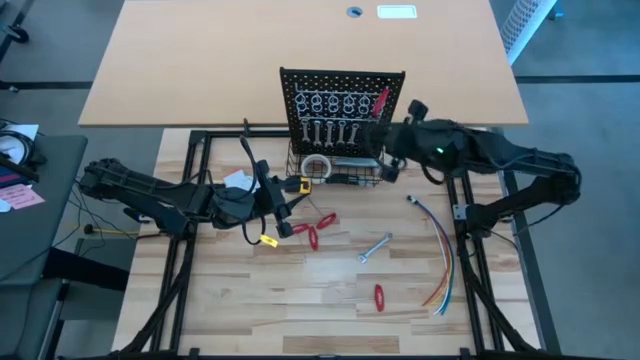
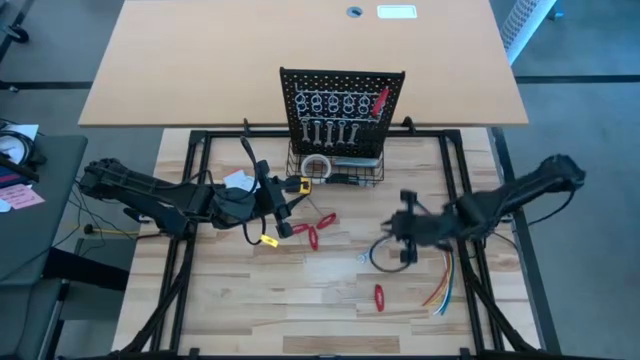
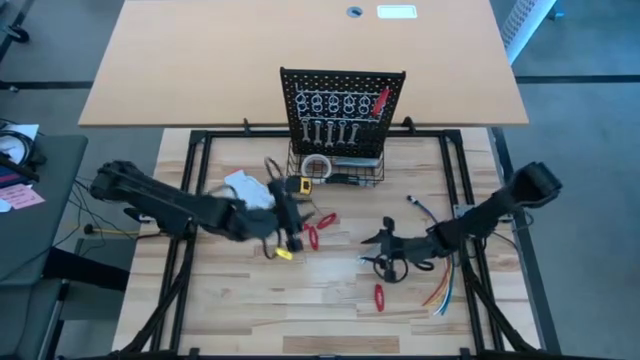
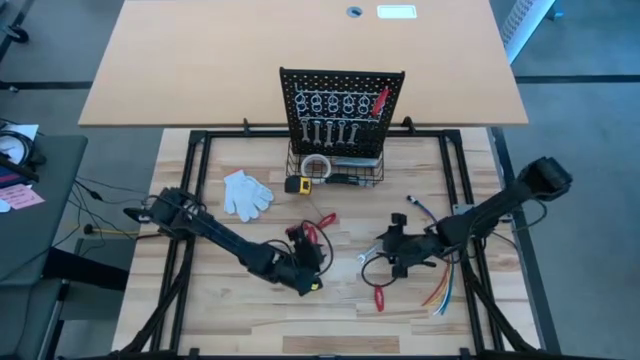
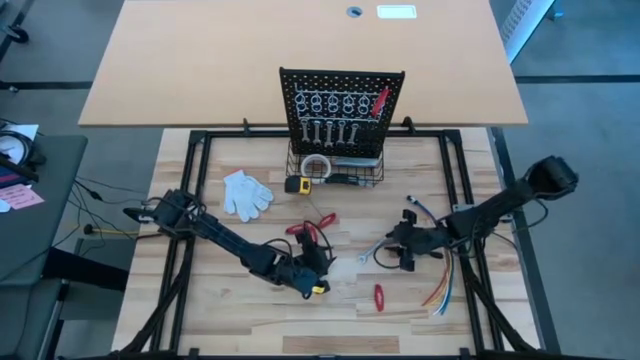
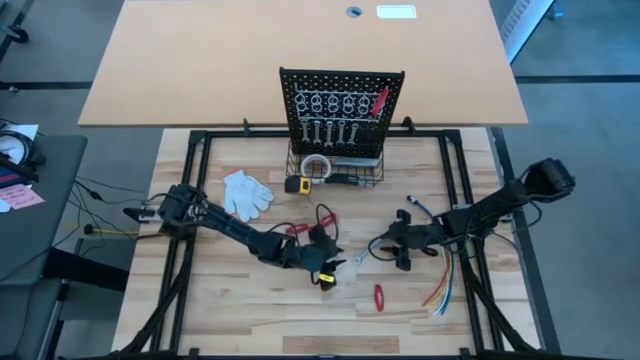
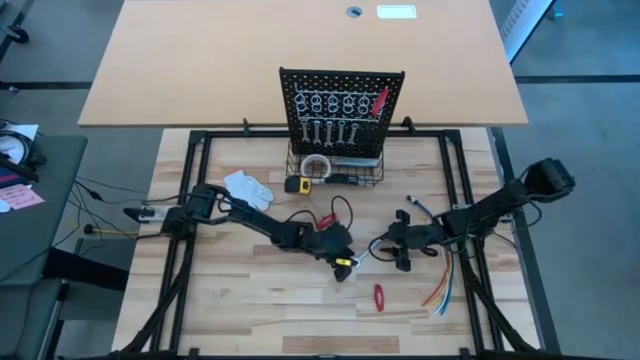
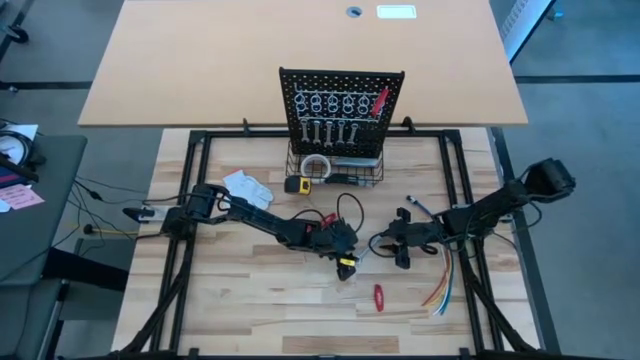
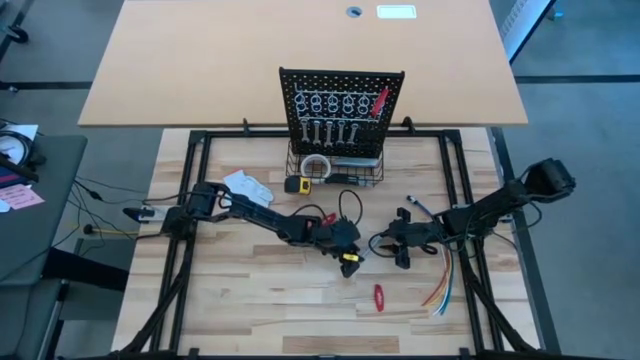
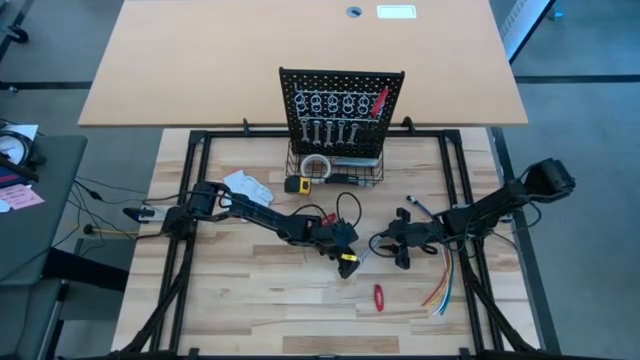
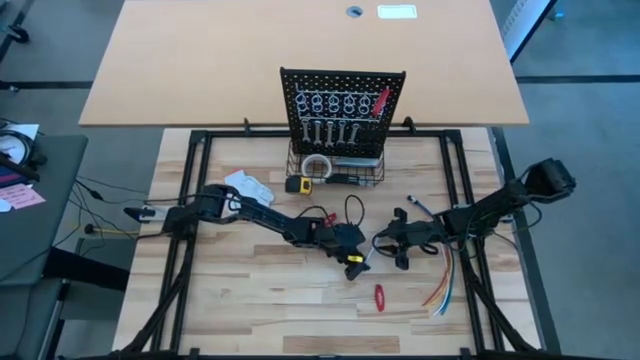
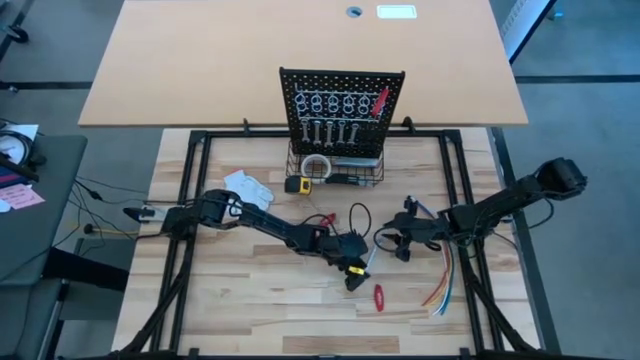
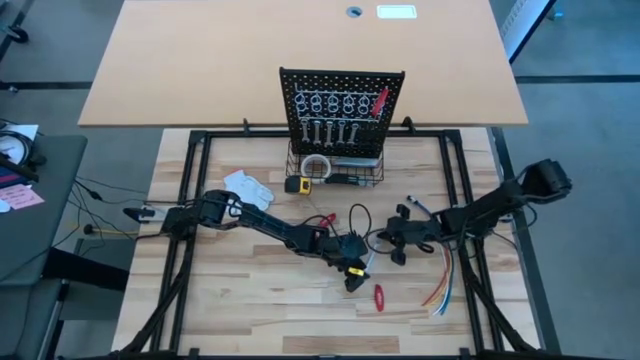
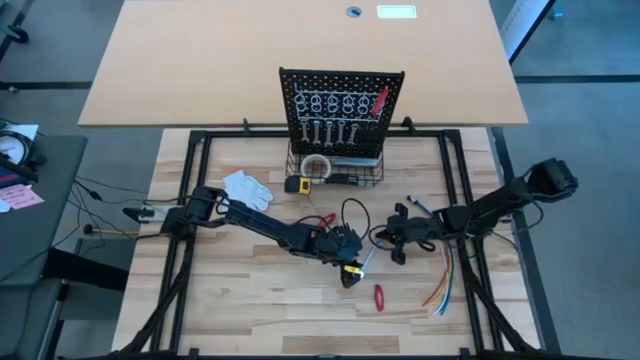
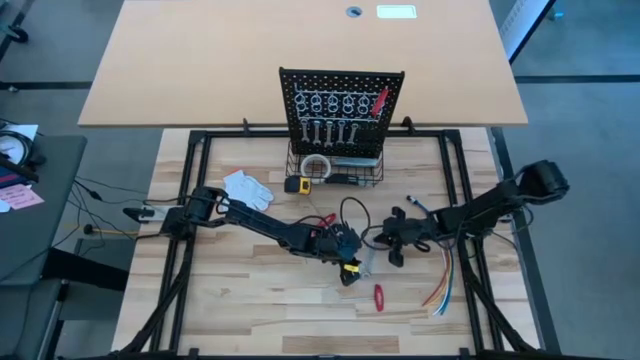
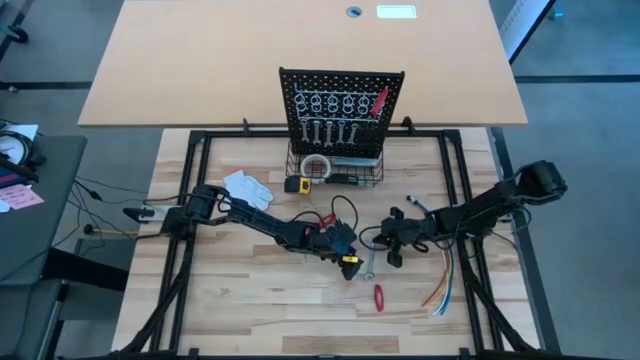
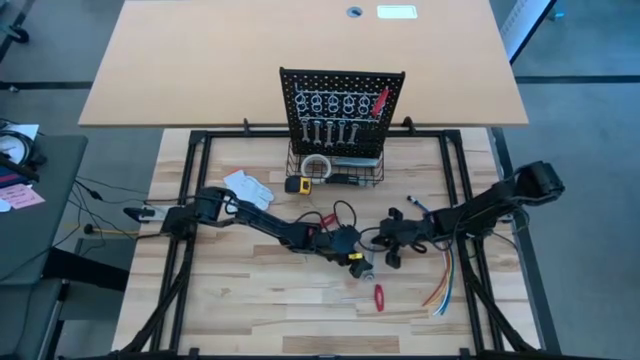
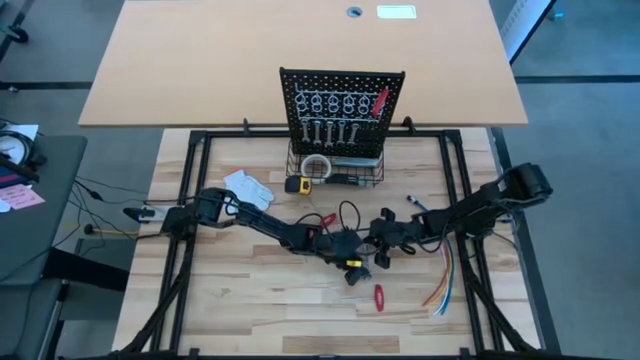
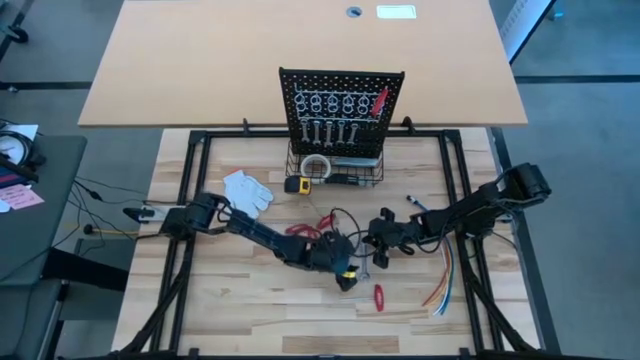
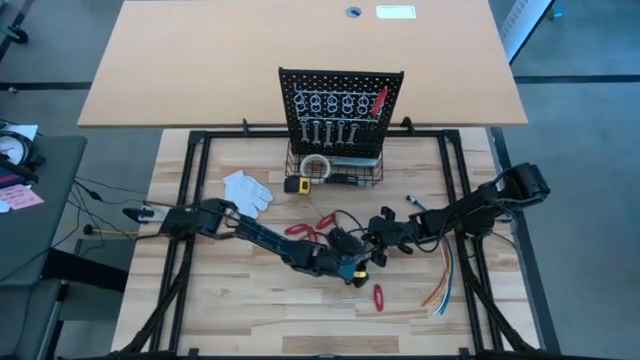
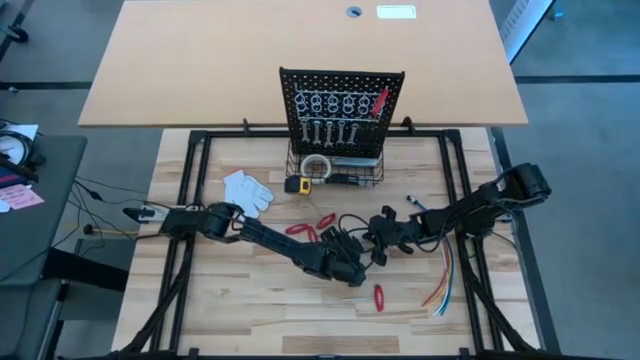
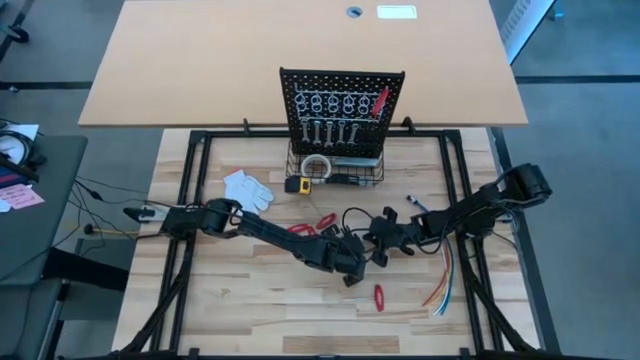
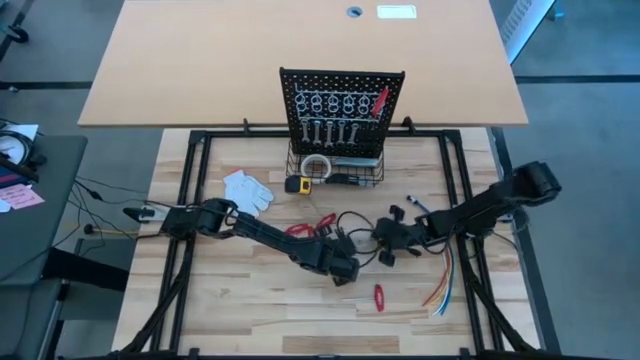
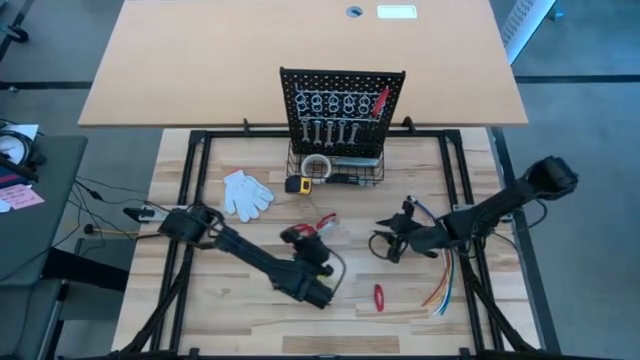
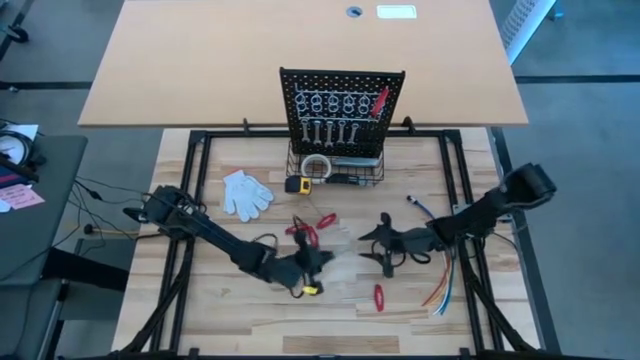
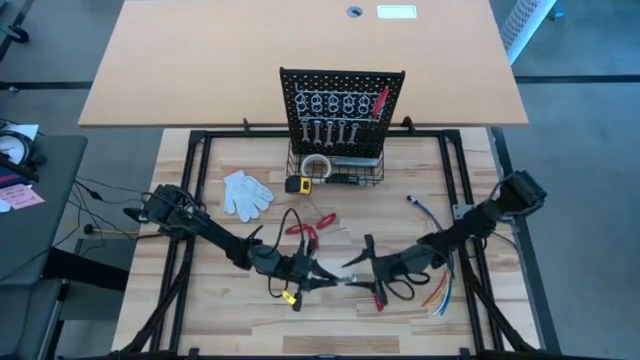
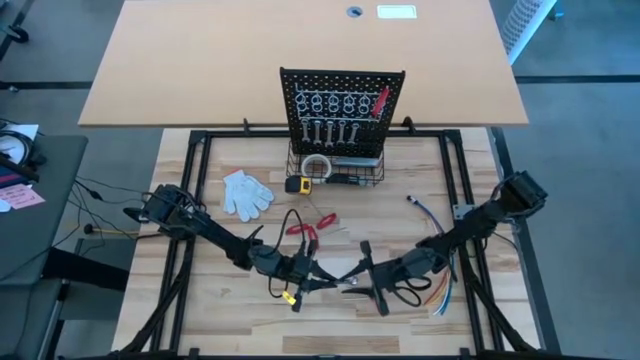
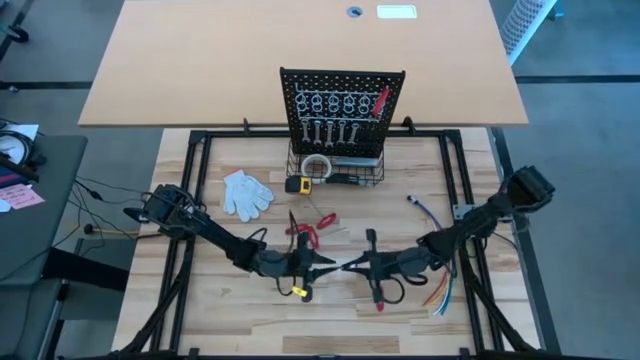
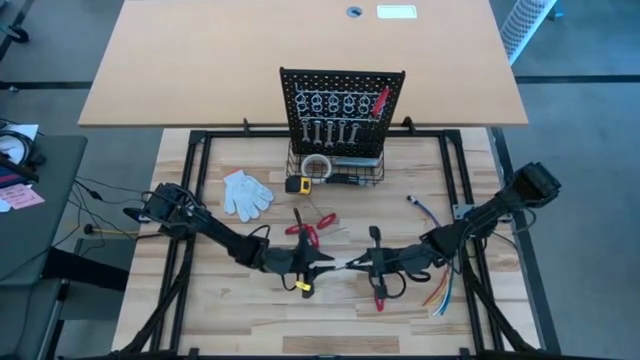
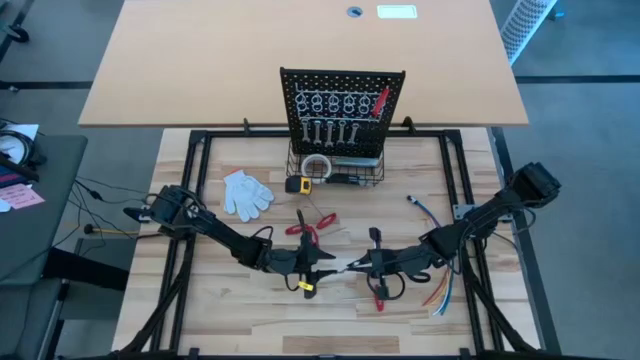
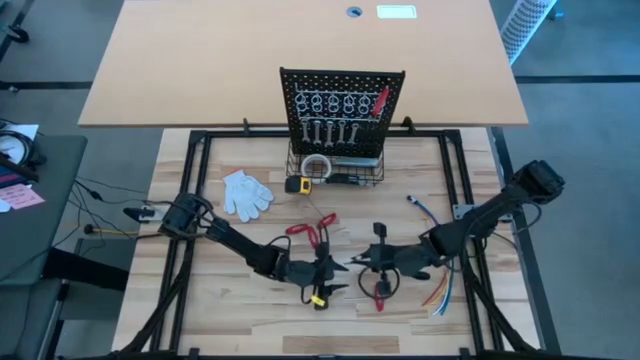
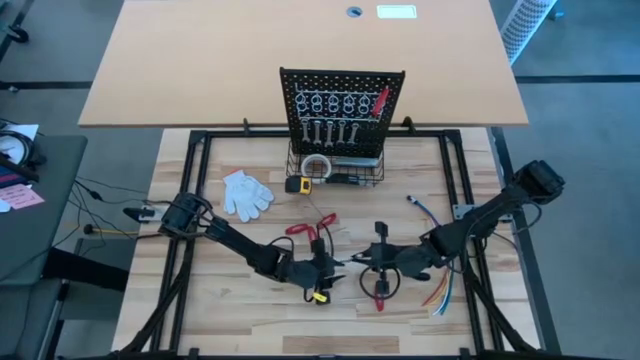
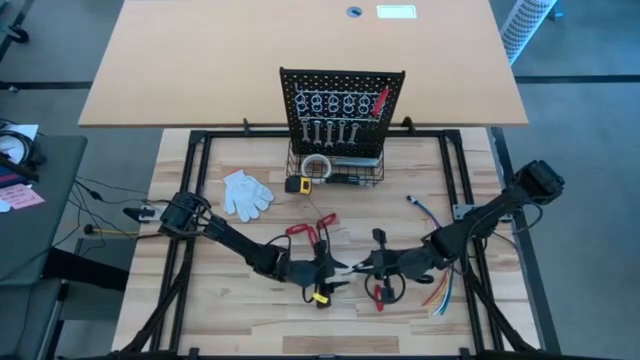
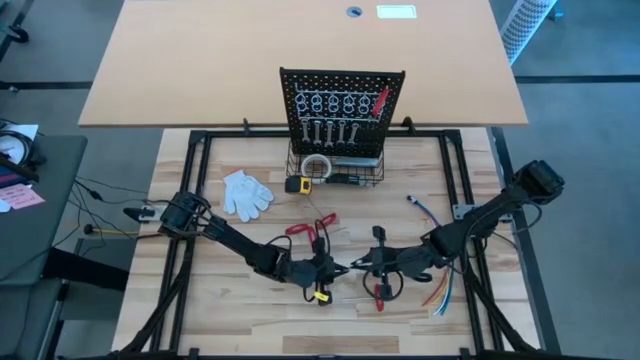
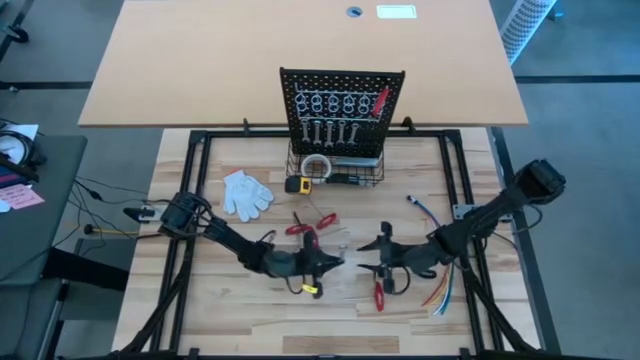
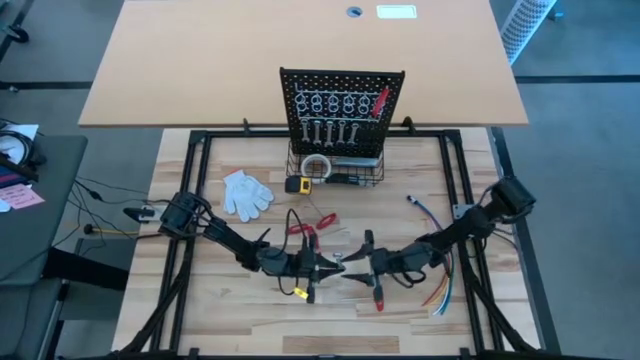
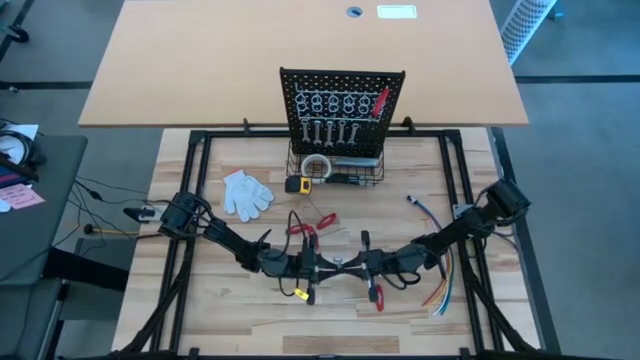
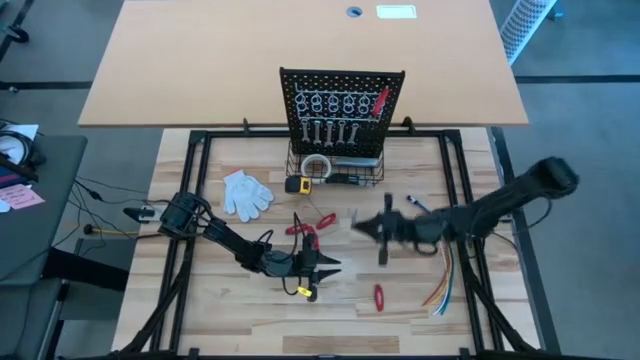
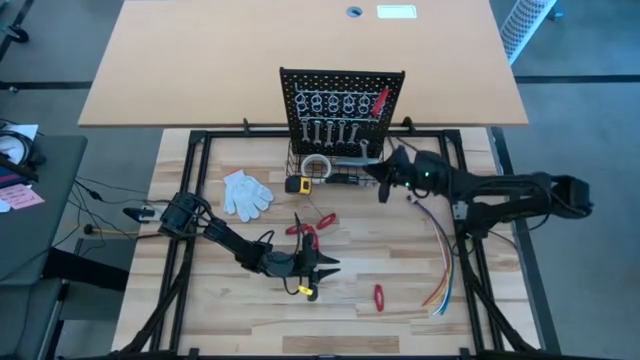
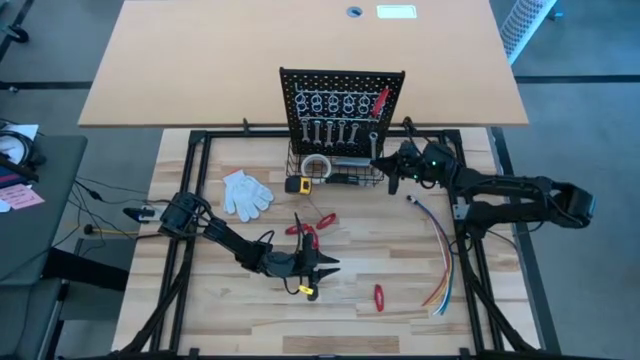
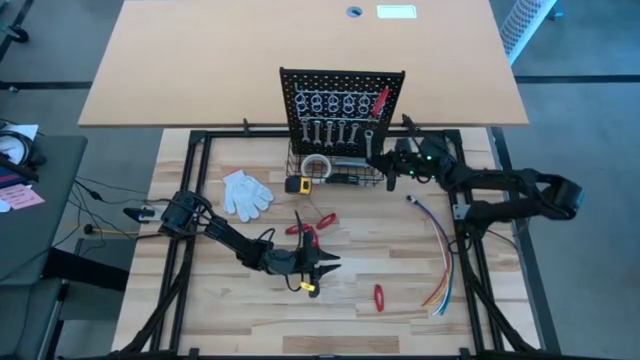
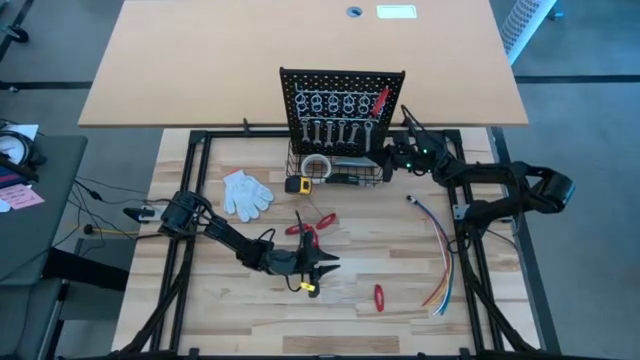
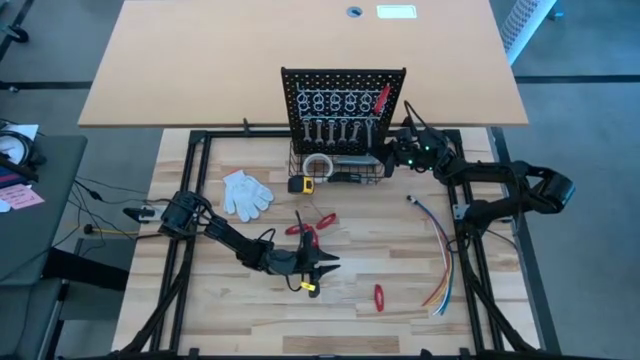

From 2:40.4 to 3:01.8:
Task: Hang tools onto peg board
Hang the silver wrench on the peg board
